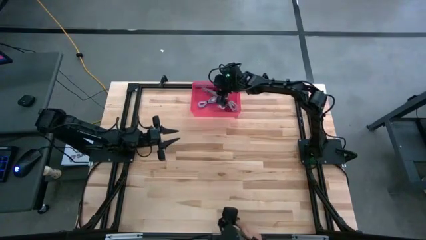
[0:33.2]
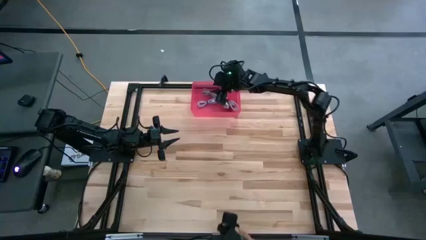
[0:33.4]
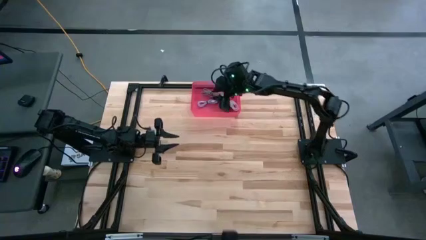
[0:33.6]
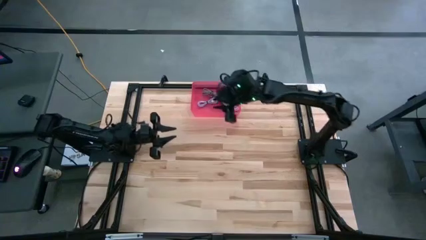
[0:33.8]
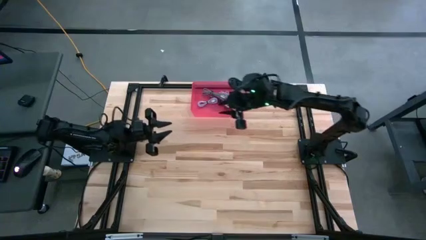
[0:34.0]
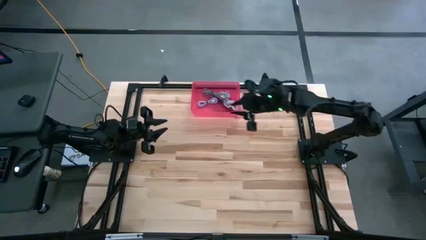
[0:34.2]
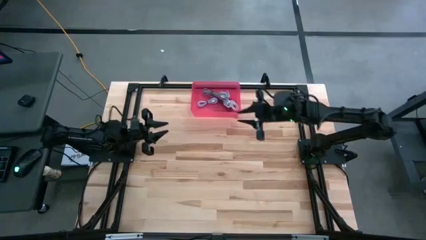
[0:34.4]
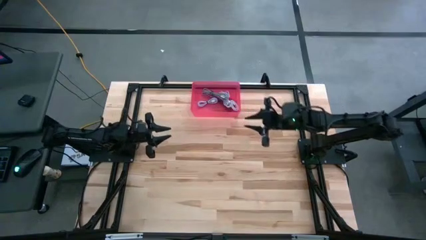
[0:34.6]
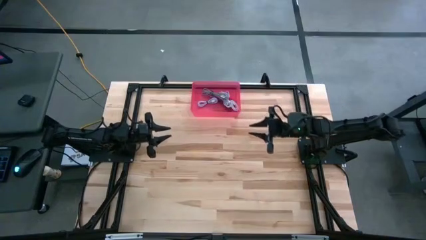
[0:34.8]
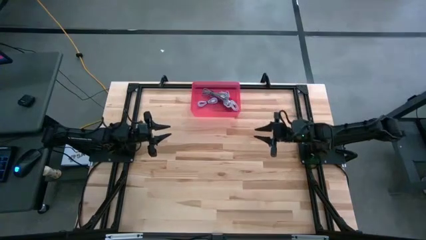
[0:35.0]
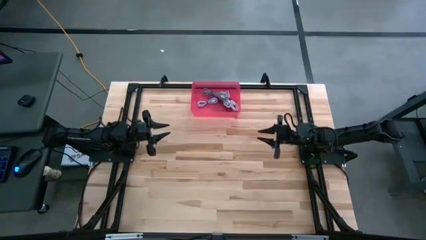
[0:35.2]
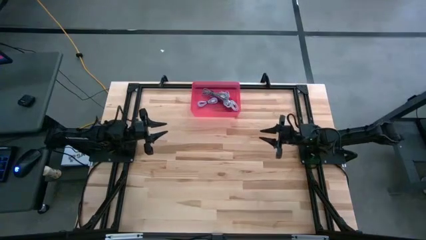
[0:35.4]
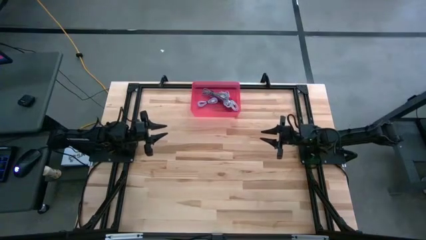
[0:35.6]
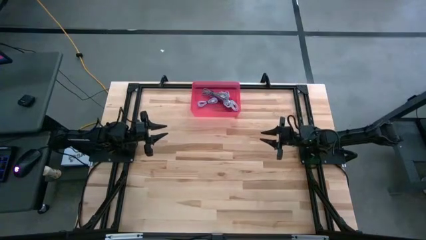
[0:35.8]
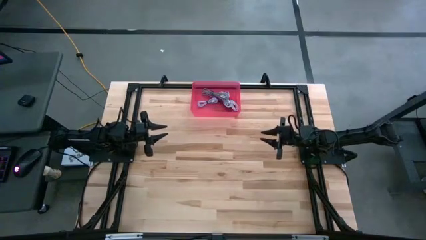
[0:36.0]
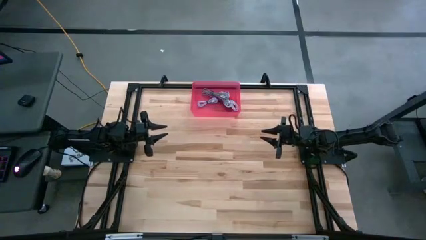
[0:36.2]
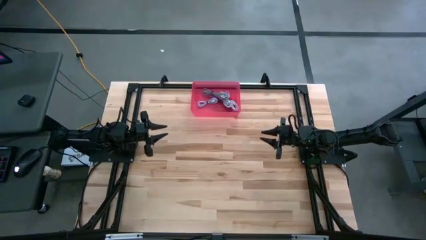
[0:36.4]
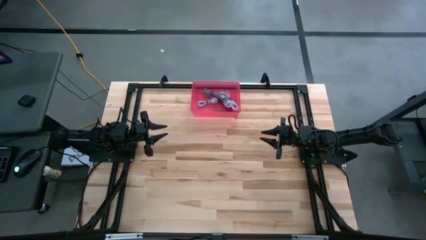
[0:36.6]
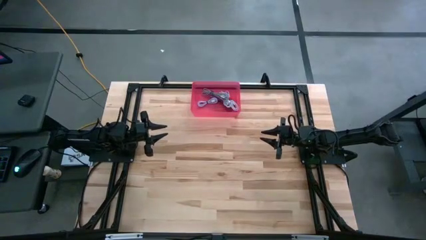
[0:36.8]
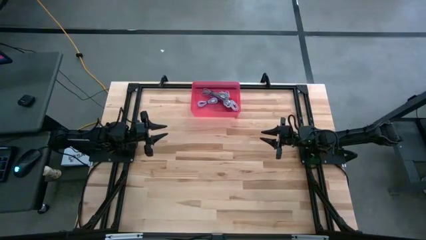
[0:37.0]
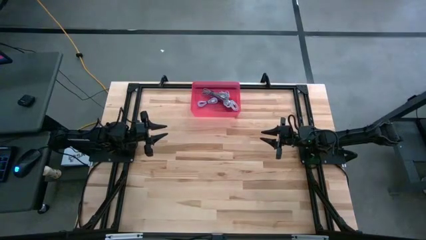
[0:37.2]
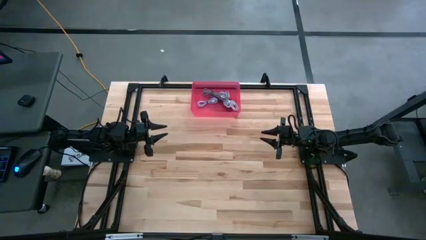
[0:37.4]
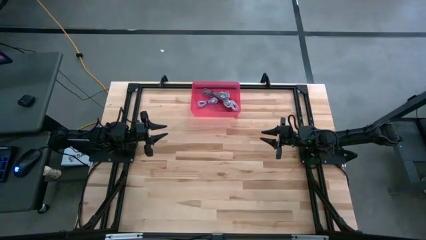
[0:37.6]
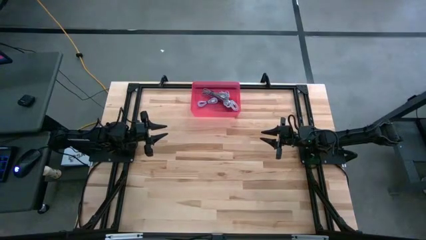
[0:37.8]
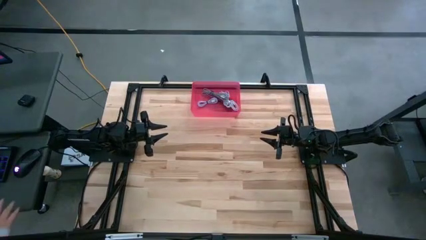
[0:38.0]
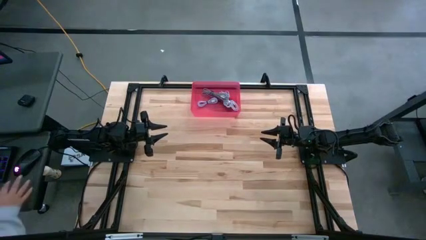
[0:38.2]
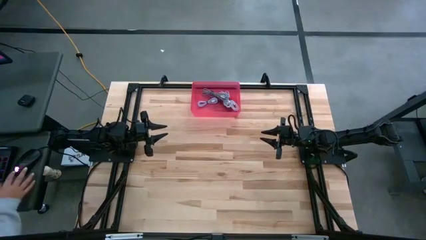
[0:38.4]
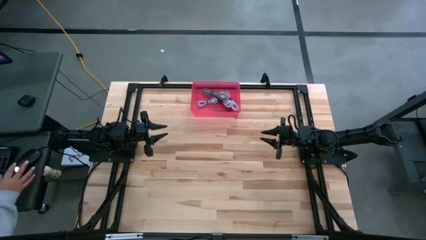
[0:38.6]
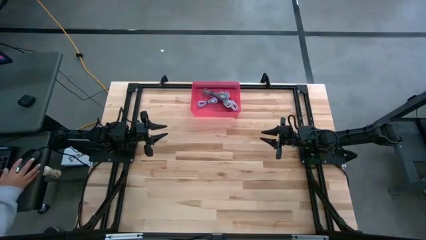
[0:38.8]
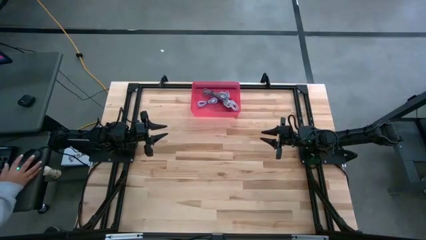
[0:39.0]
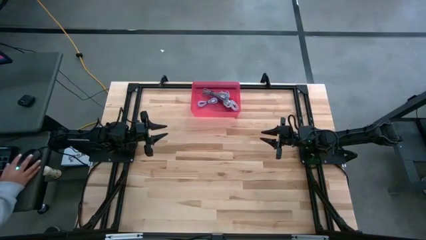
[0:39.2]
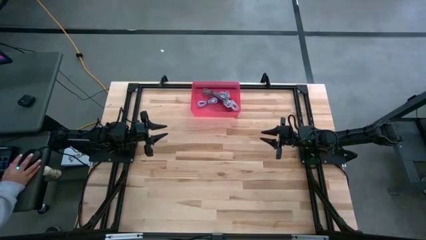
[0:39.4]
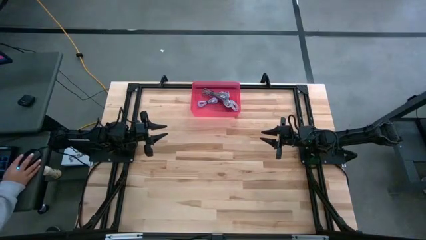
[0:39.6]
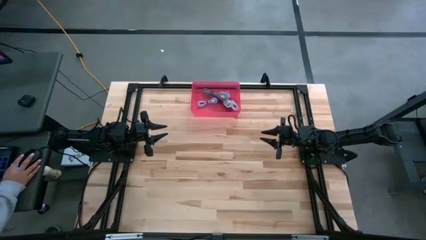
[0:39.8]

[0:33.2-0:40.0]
Return to Home Position
